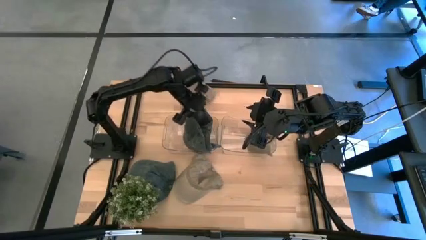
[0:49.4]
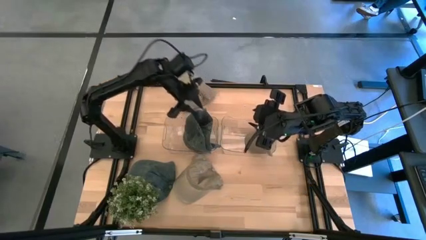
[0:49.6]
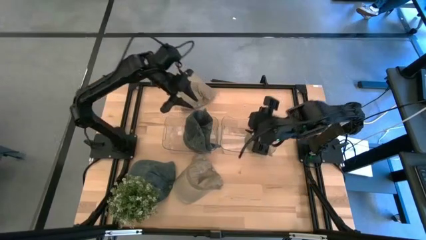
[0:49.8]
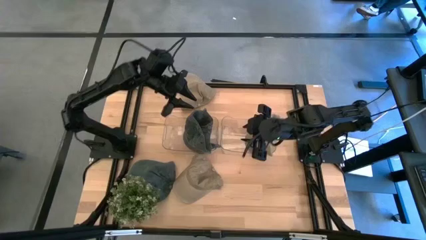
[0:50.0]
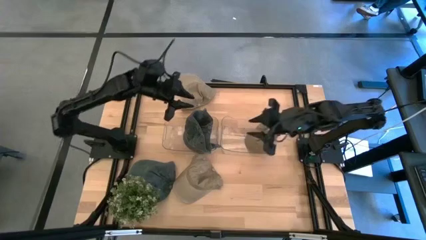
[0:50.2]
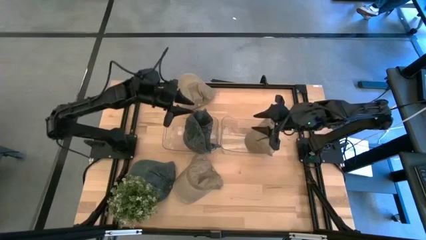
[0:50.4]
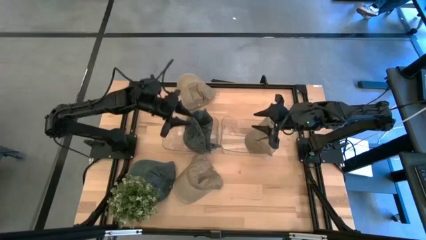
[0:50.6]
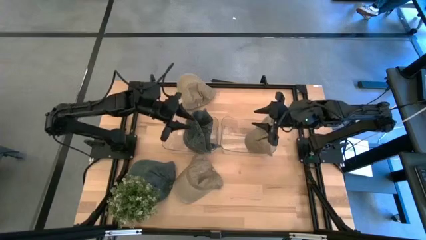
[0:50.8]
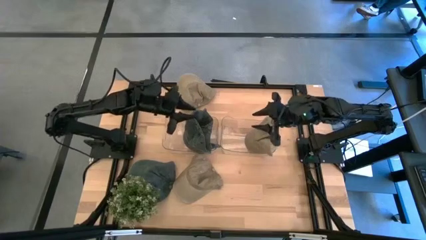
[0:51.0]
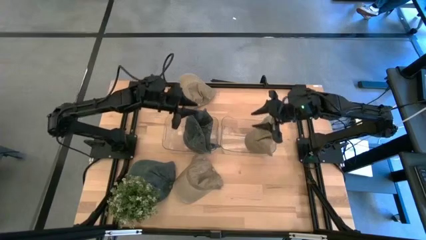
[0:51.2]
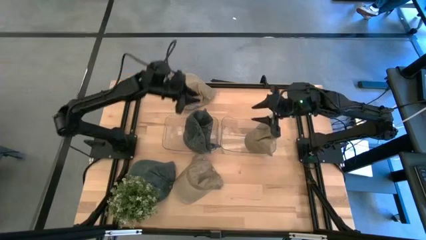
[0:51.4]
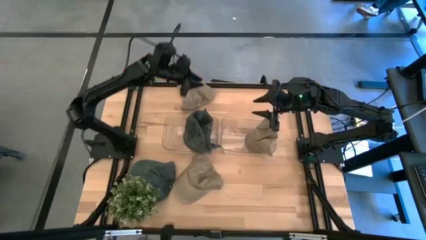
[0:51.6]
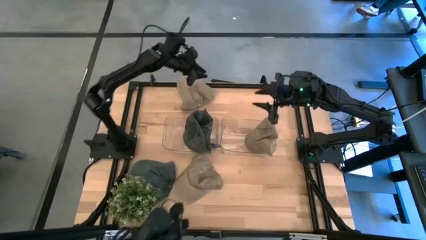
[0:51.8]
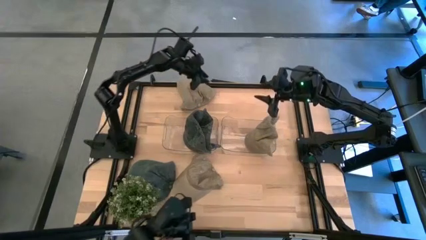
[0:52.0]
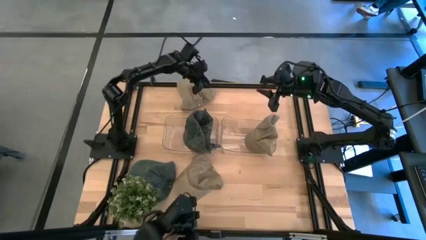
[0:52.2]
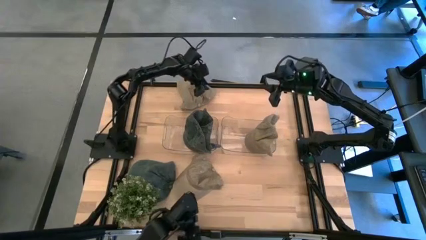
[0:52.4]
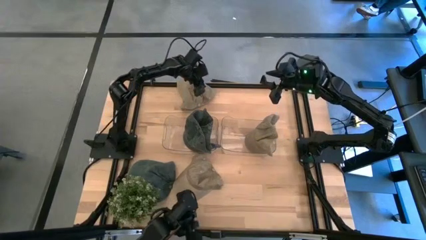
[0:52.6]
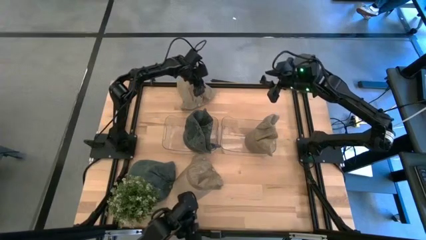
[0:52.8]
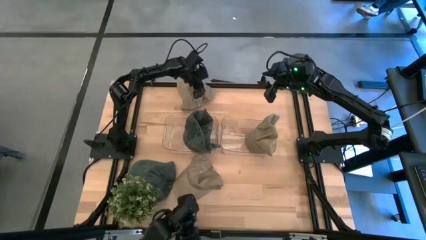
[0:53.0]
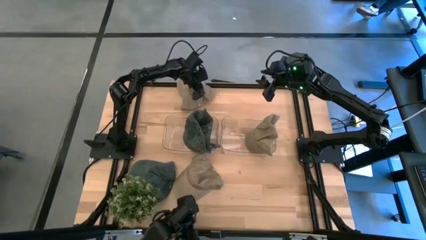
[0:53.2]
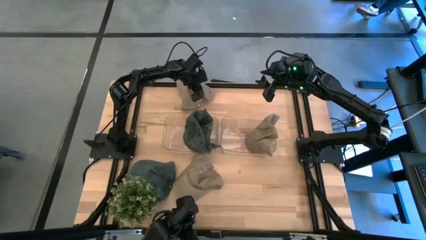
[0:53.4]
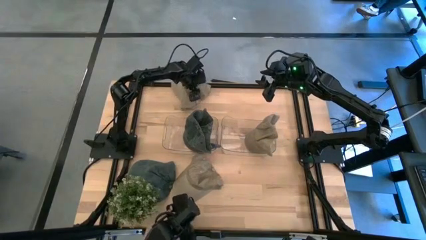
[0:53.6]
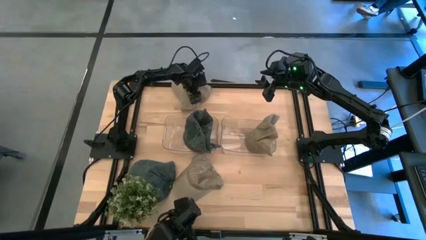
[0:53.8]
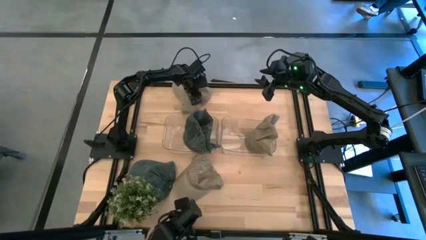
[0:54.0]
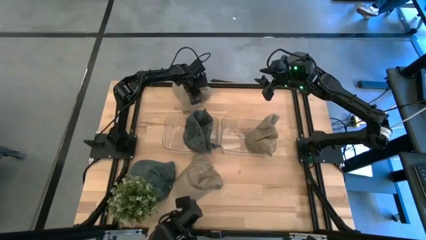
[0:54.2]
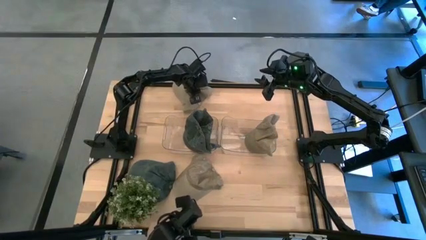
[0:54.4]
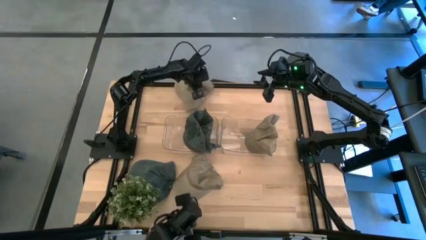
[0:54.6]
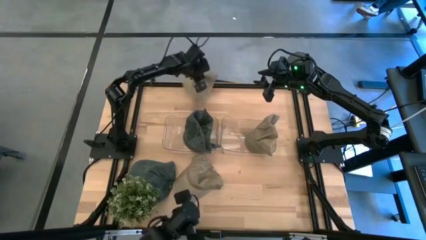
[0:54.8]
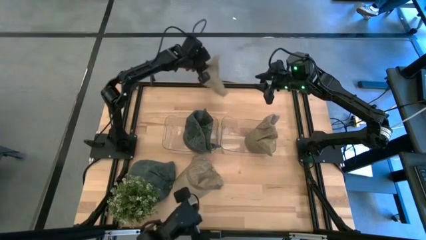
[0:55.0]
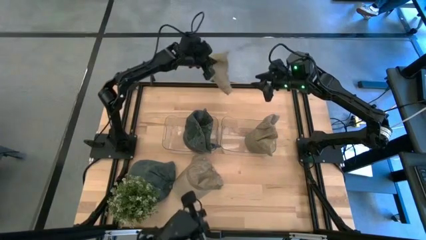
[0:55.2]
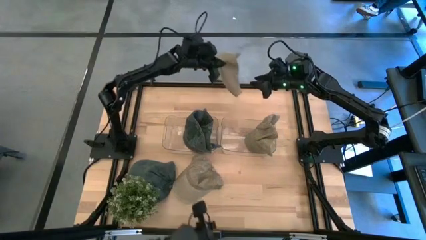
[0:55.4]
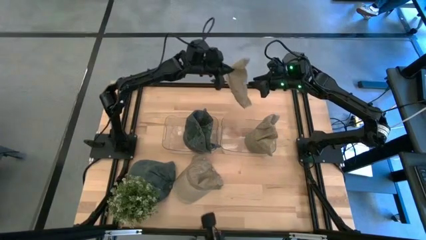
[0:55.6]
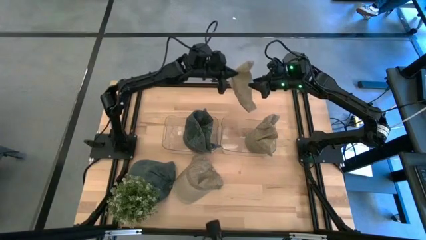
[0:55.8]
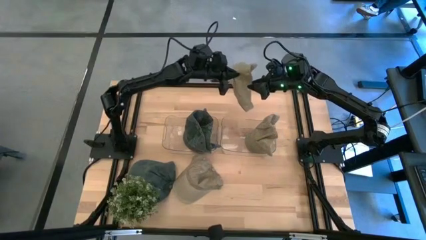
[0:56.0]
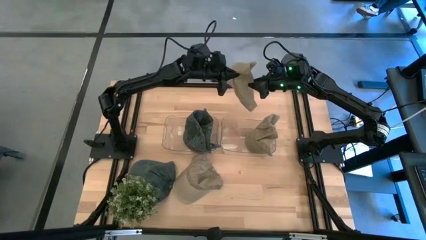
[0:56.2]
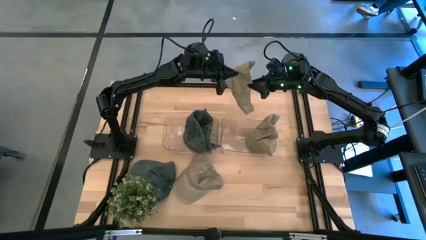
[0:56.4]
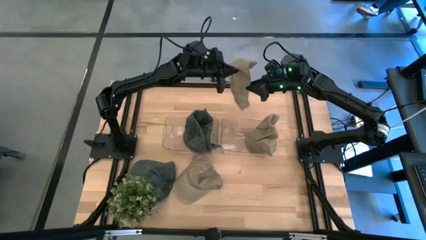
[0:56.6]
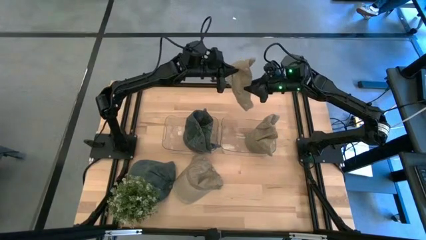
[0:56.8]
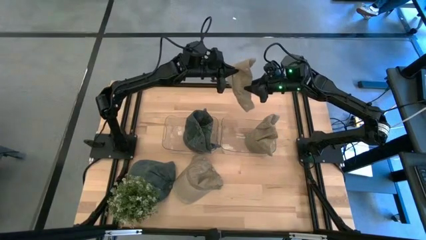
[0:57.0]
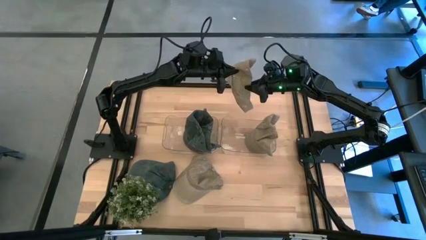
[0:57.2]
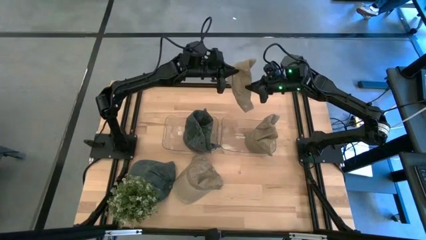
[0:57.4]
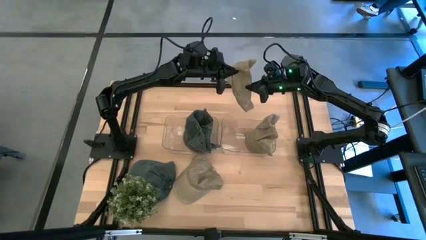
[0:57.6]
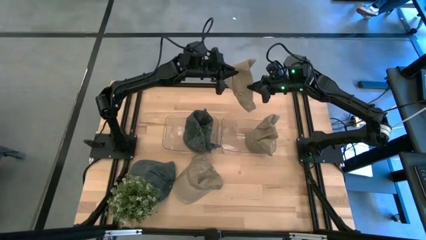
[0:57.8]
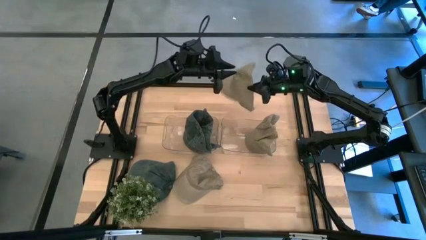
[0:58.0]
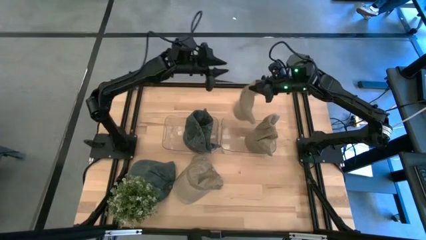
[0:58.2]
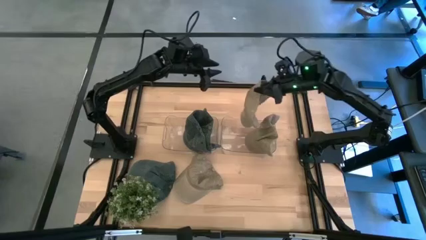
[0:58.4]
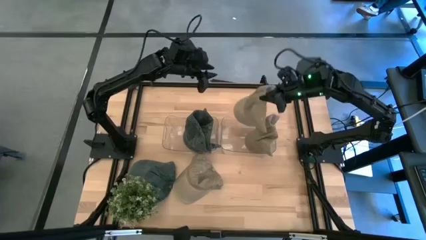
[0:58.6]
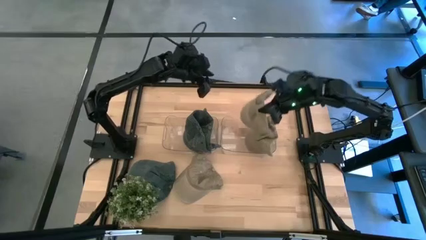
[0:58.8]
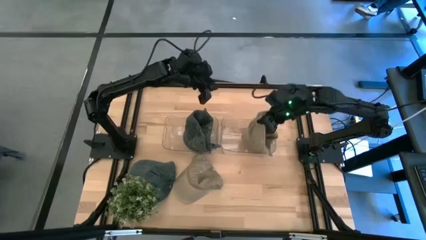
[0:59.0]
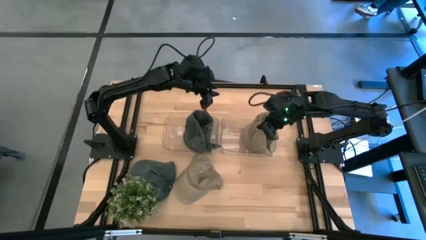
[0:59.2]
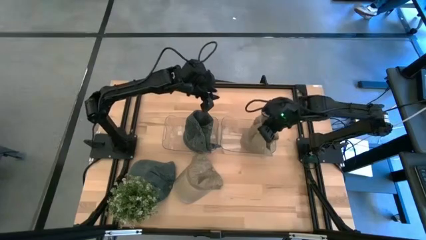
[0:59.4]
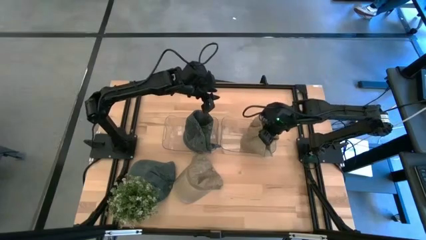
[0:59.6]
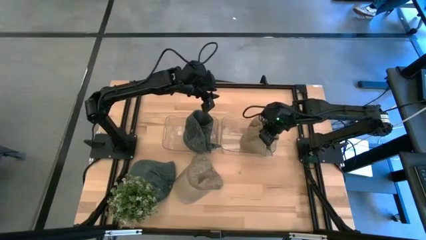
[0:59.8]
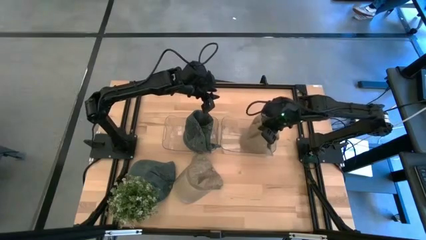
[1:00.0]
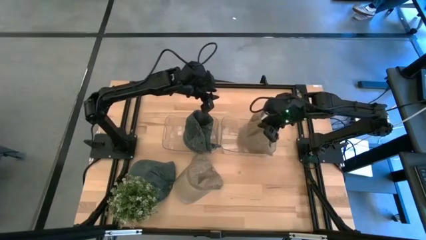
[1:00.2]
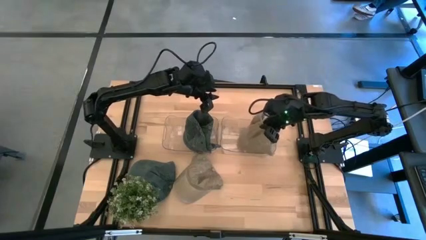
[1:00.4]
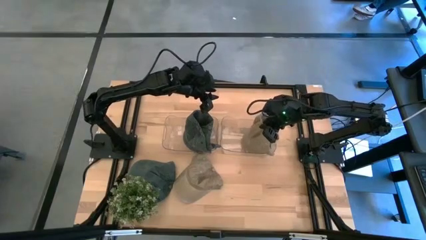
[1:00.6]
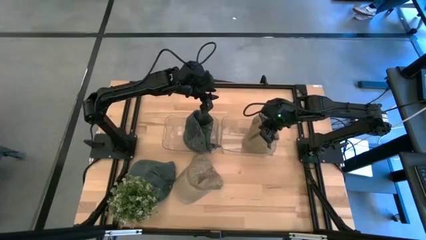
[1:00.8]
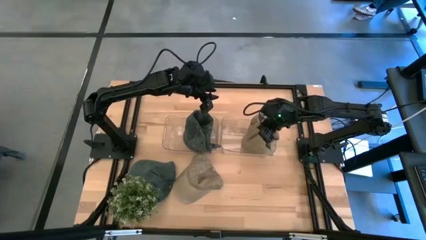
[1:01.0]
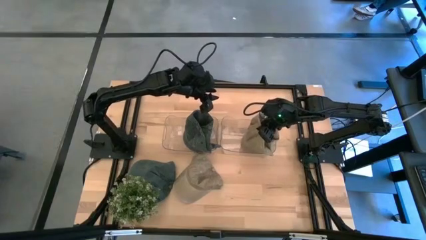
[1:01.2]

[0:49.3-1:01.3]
Task: Pick & Place hat
Put the top brown cap into the right transparent bin
